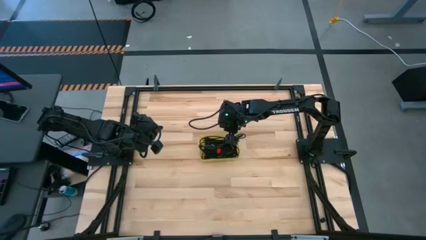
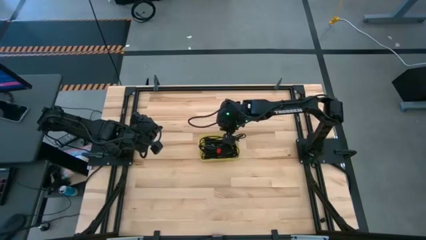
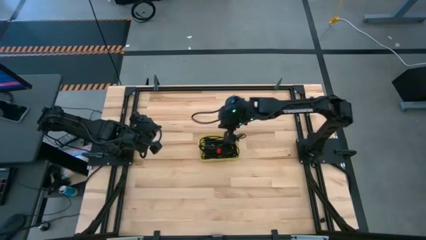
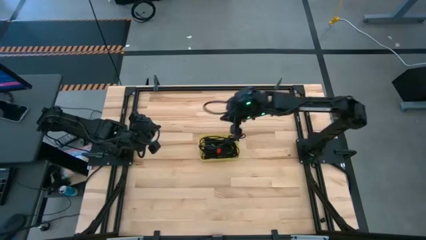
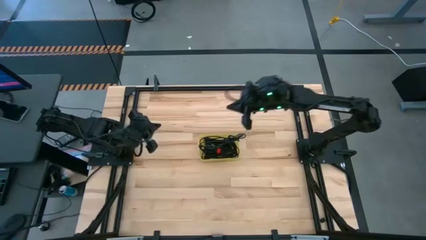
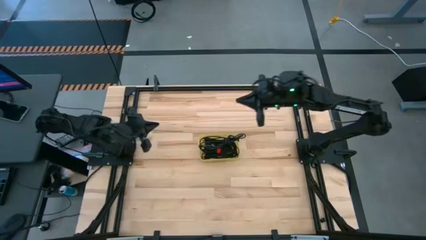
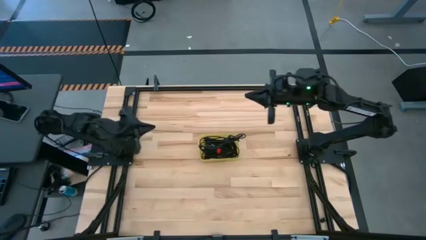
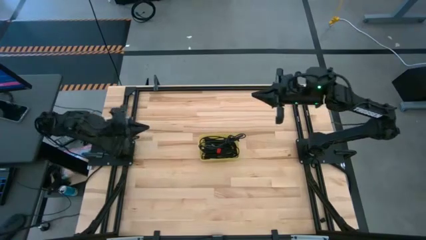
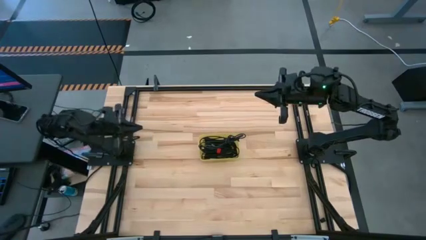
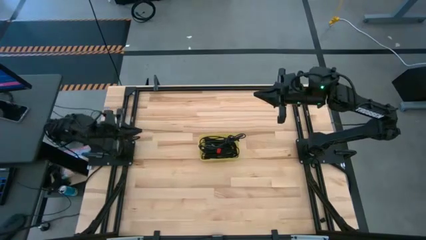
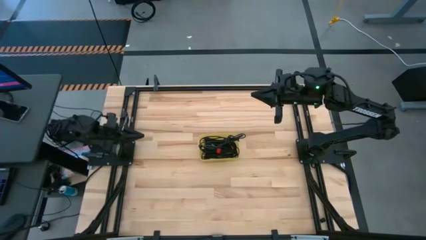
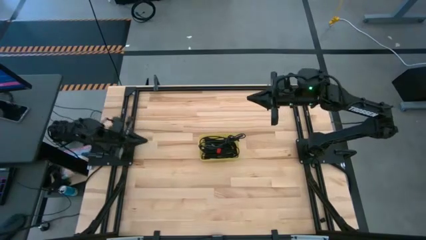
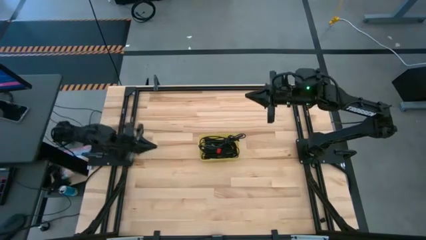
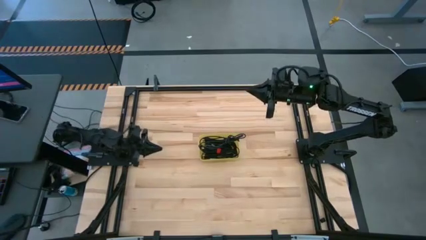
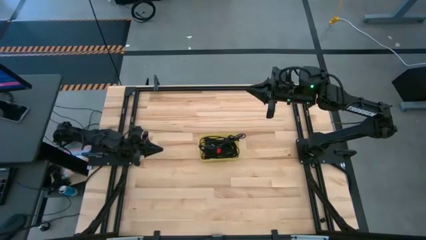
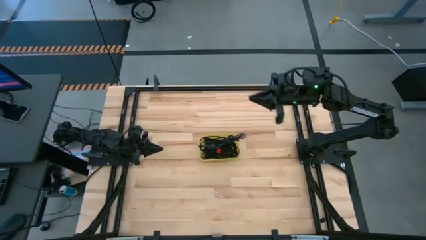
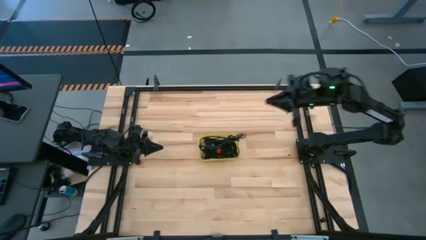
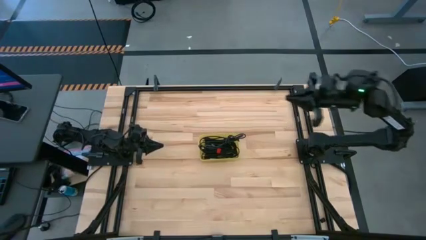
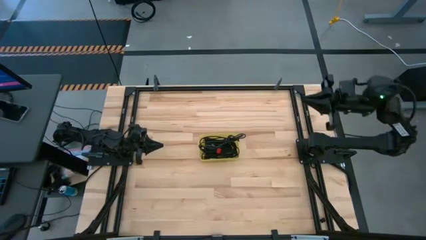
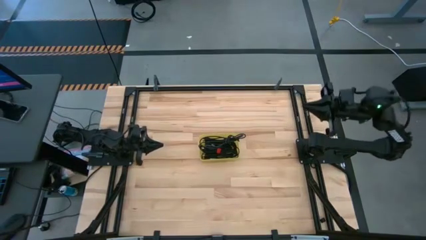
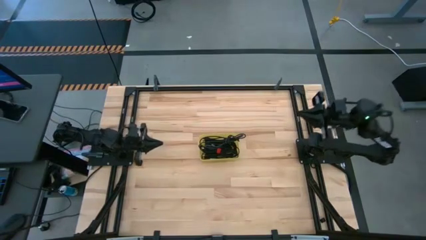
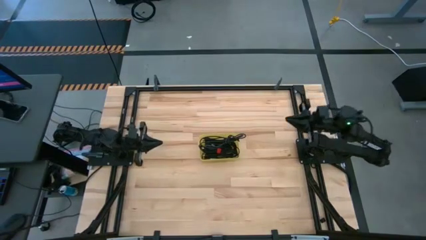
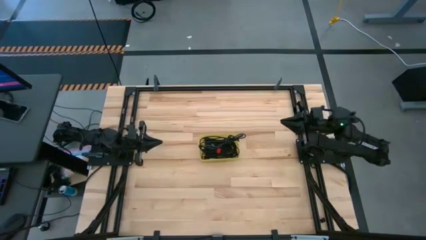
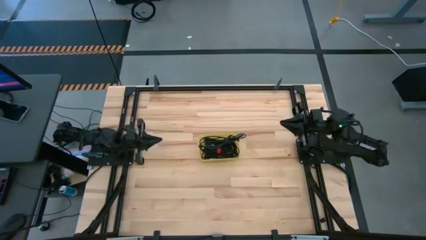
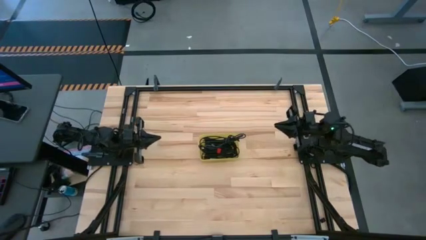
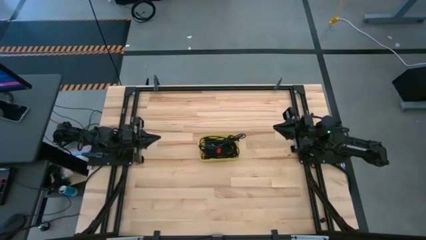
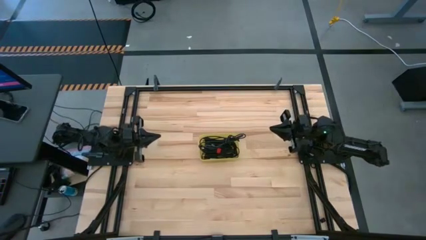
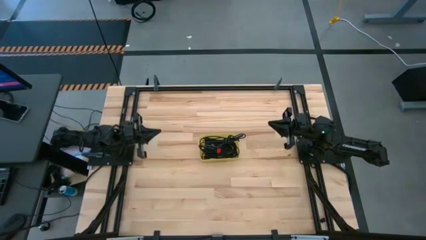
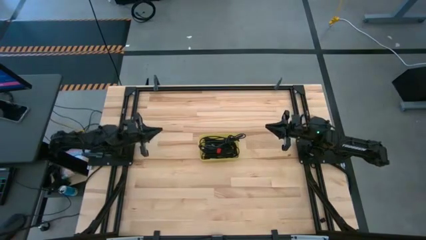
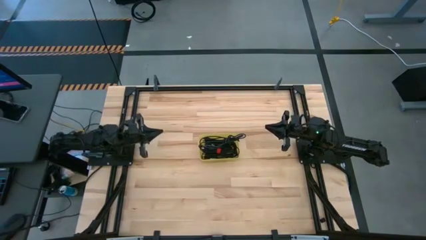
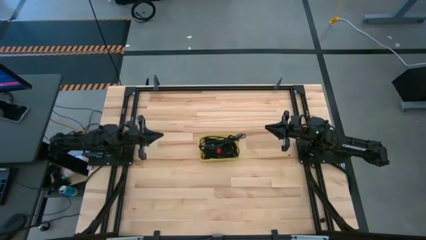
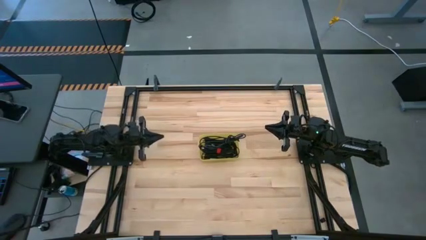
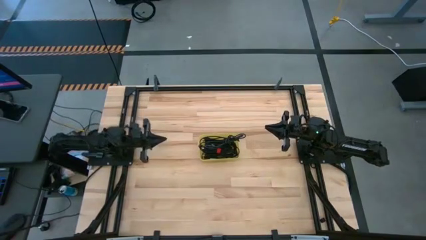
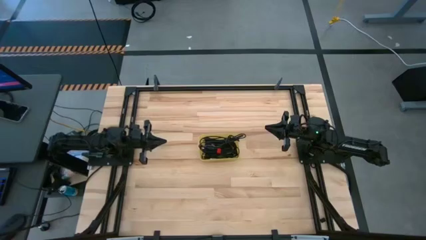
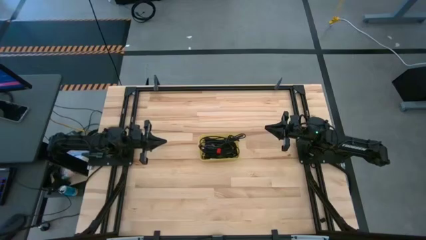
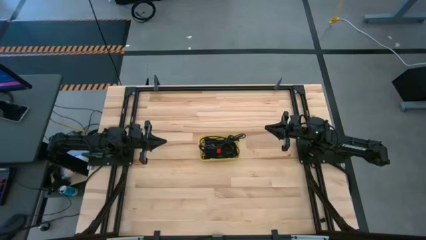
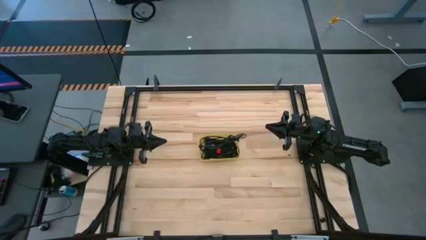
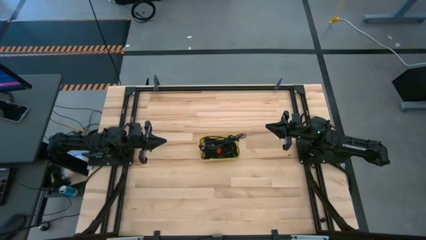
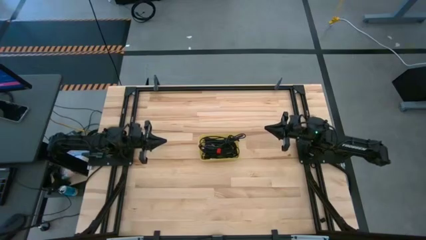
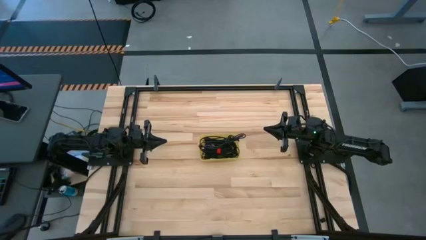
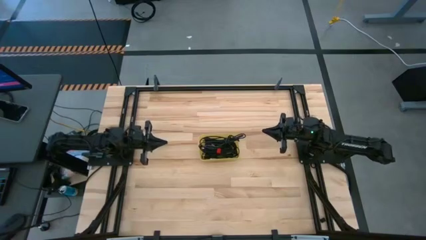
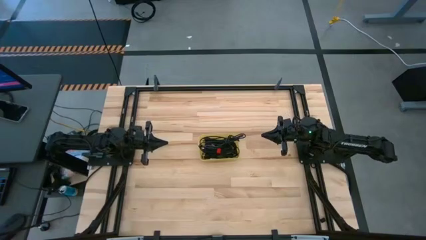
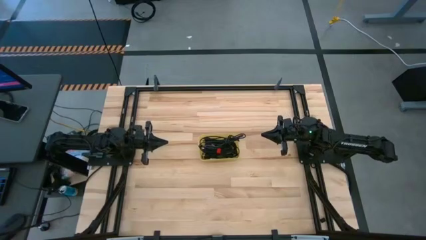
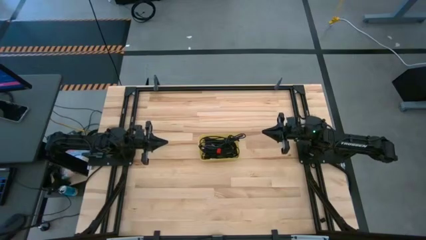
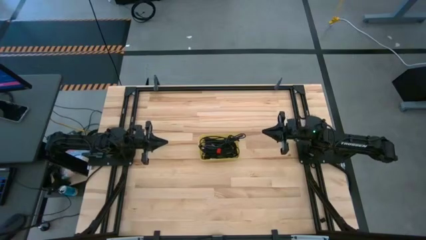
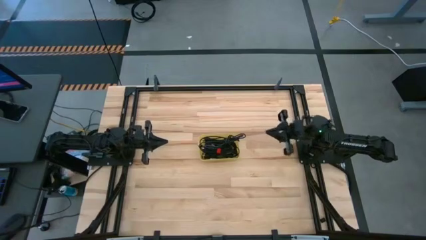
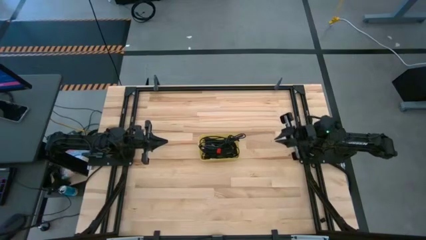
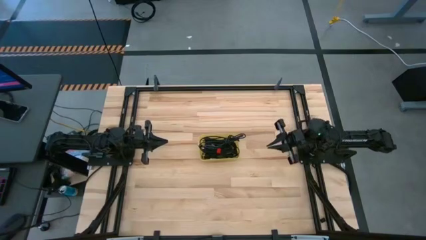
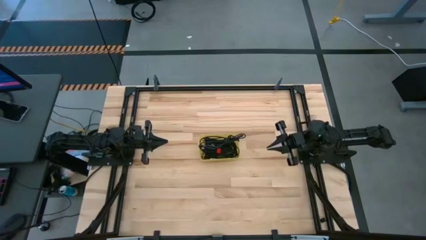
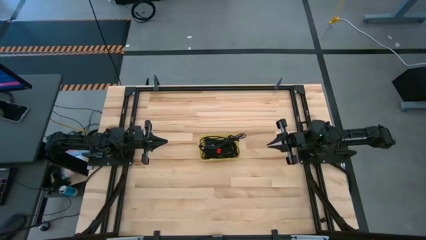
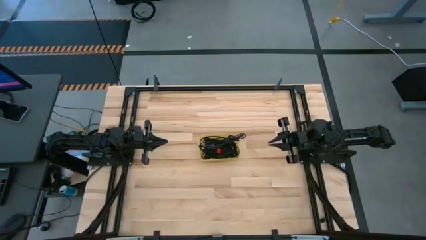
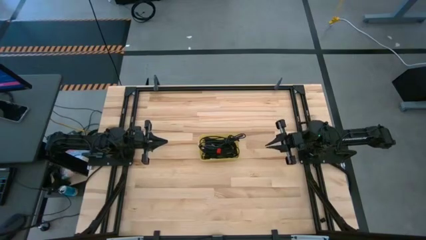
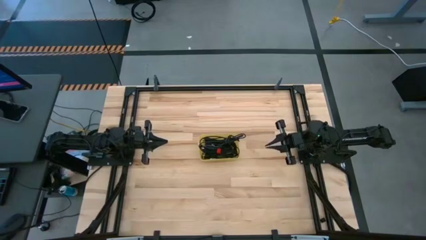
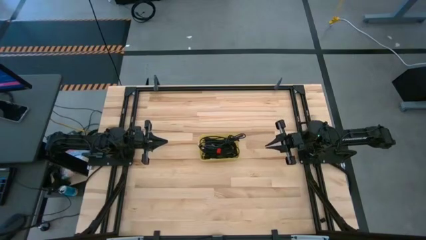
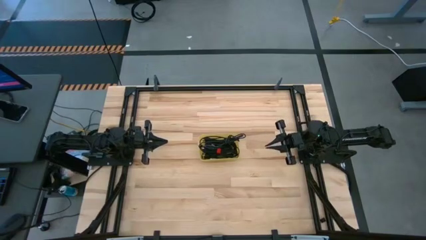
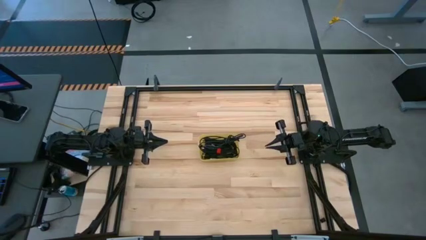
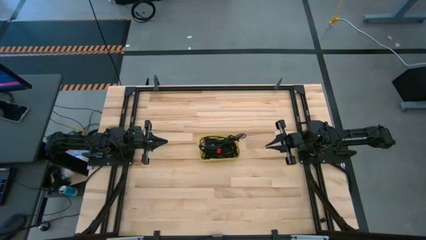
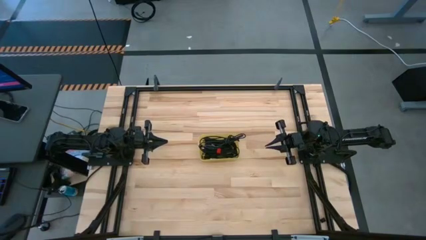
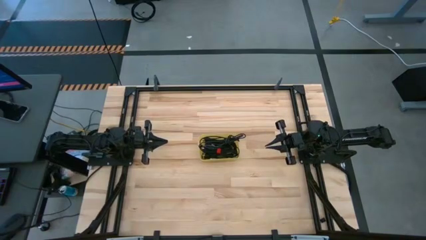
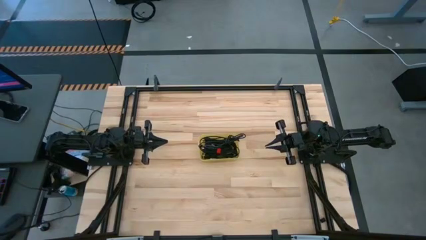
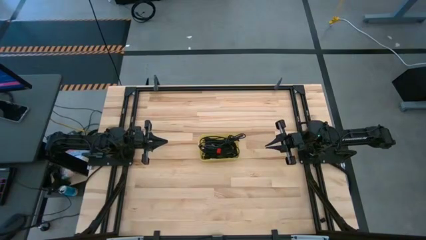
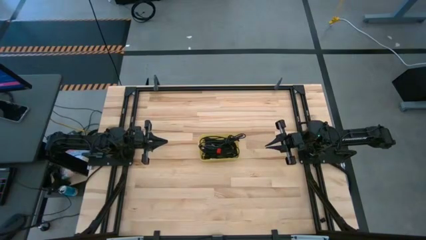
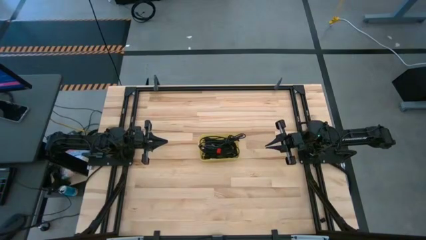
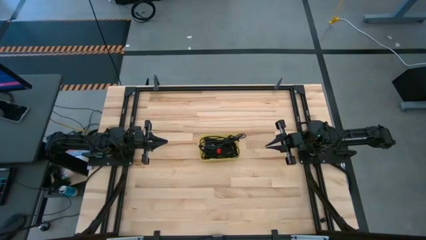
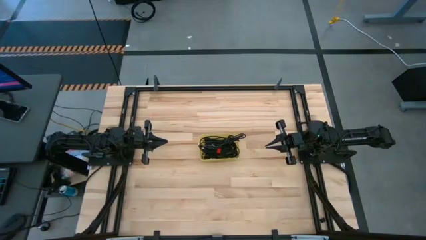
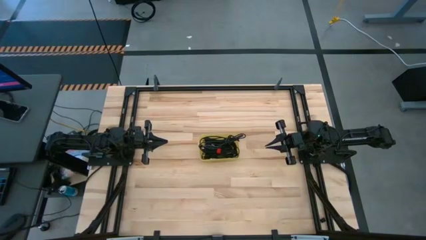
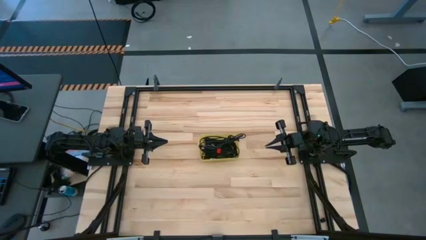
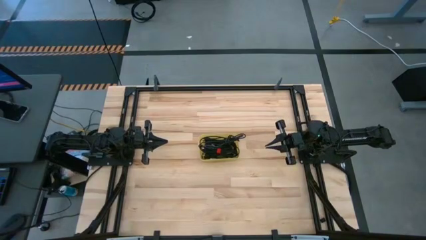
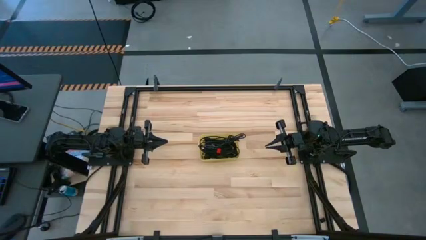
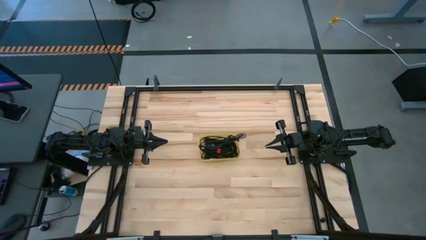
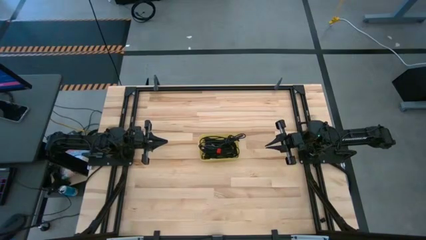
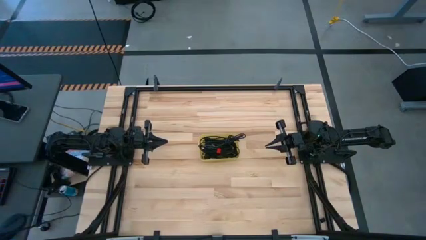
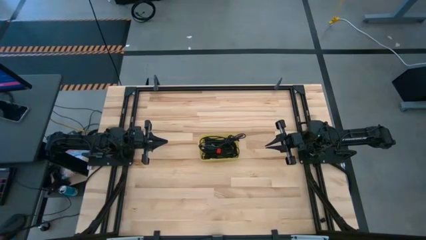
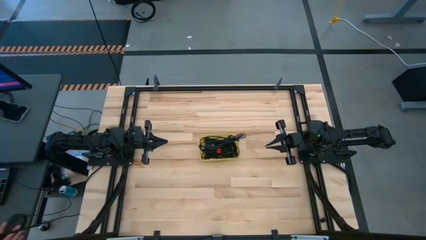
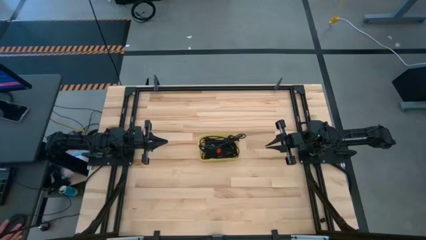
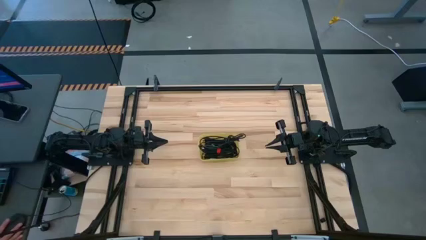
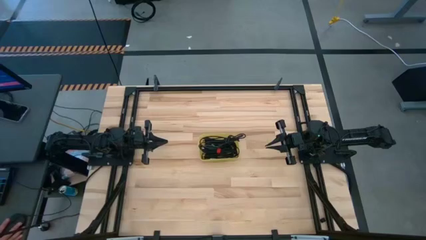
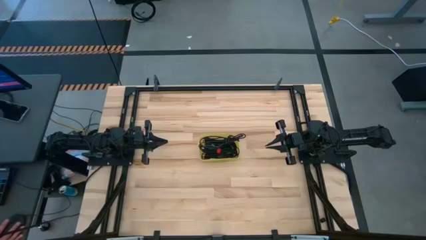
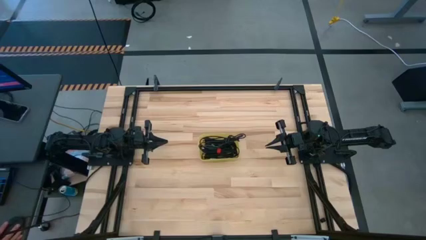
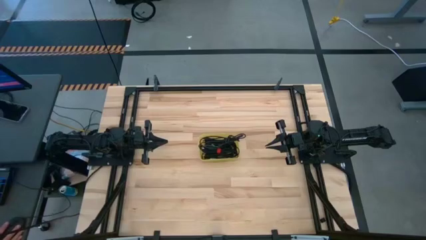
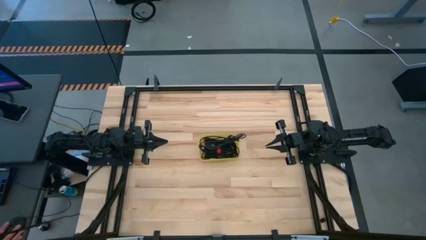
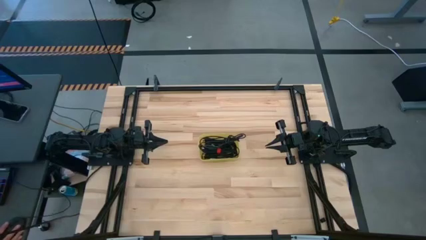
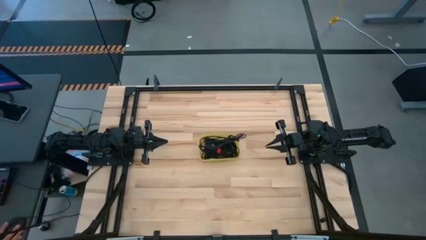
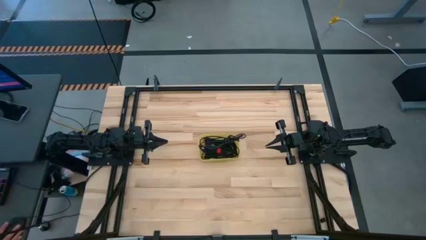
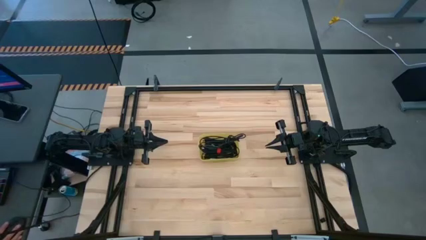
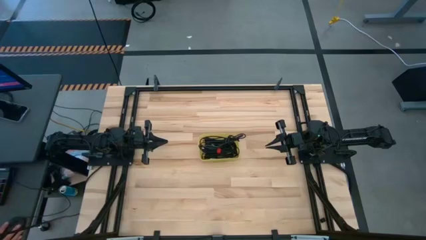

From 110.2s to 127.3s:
Task: Pick and place USB-C Cables
Return to Home Position
